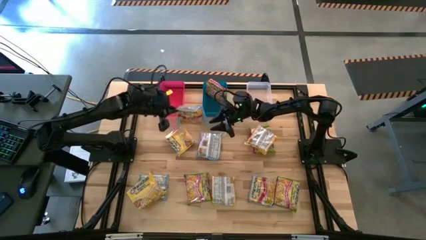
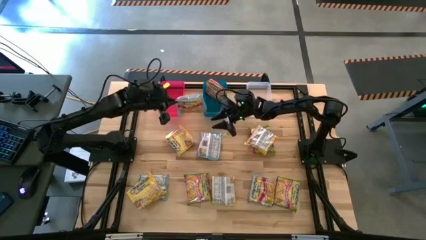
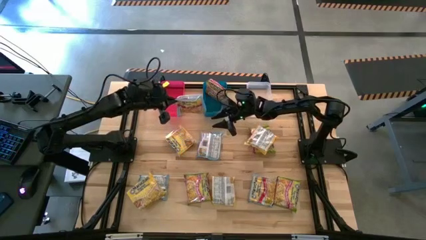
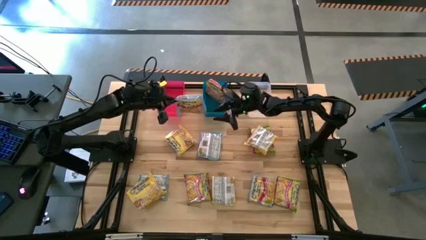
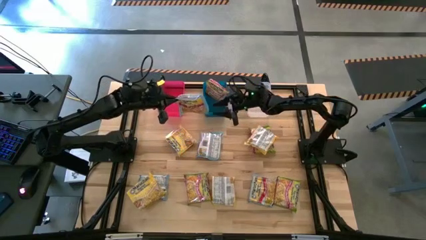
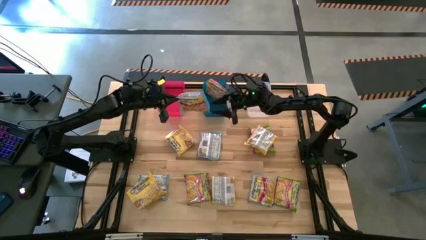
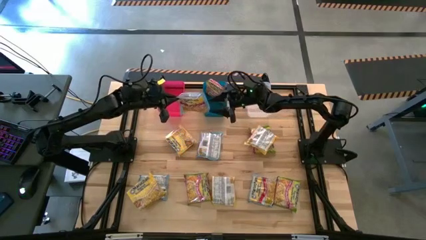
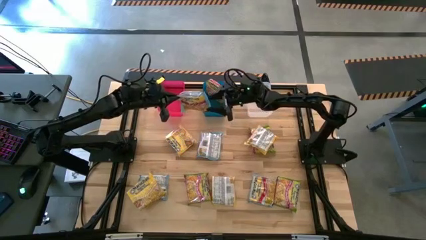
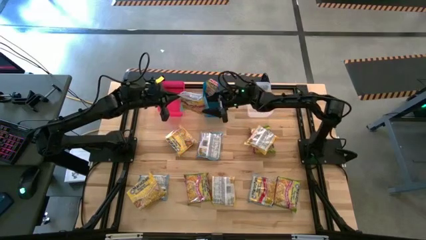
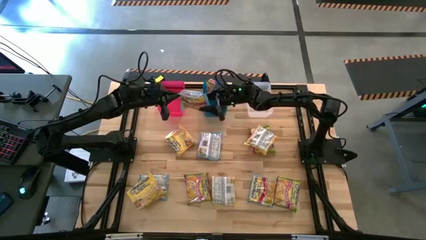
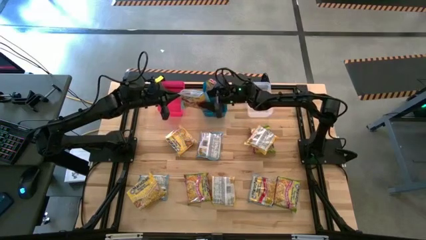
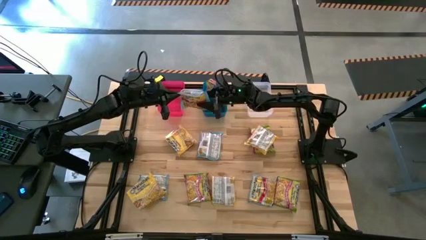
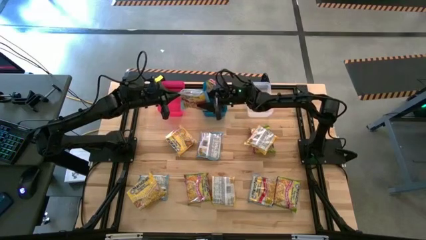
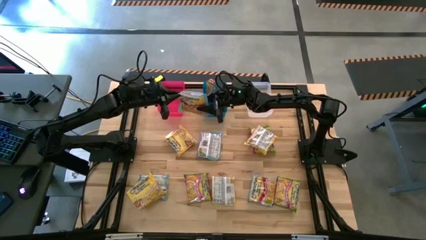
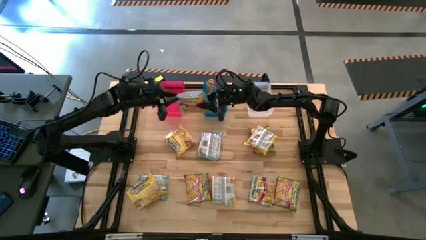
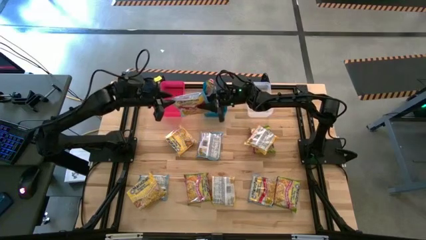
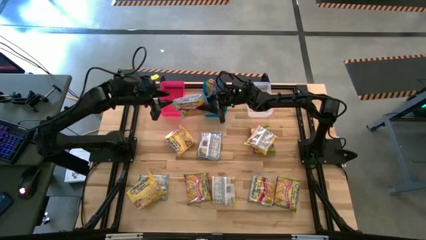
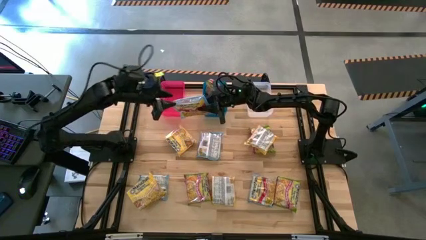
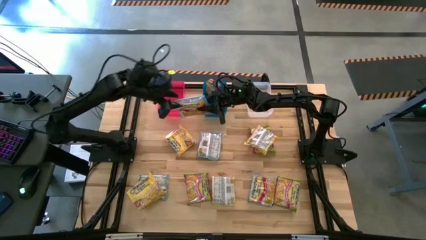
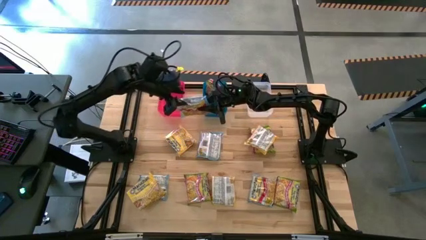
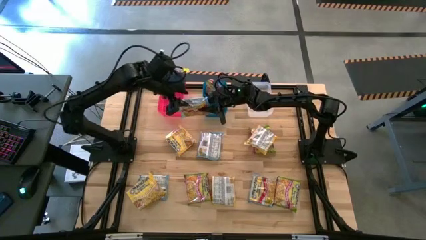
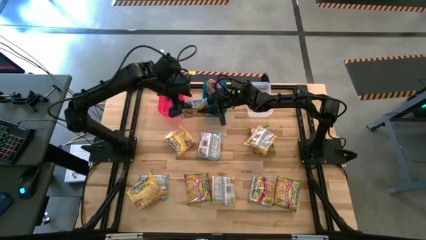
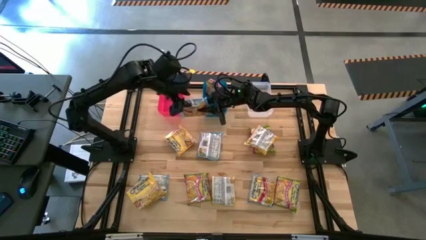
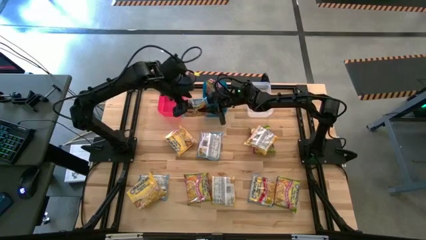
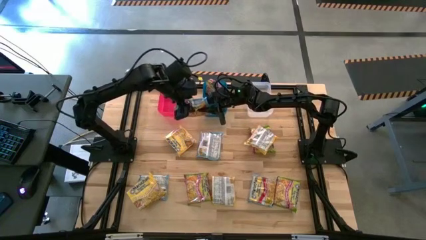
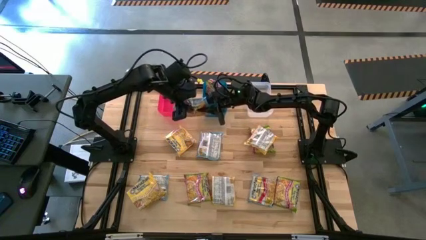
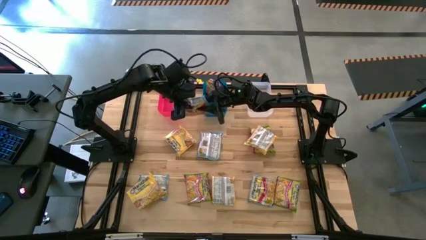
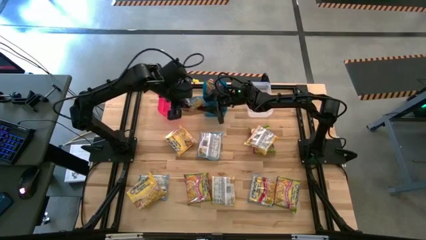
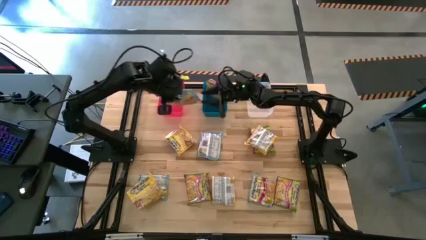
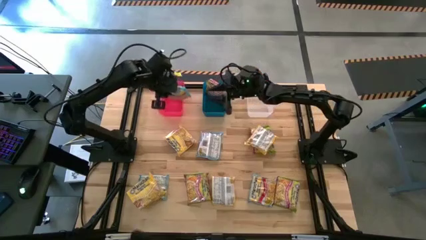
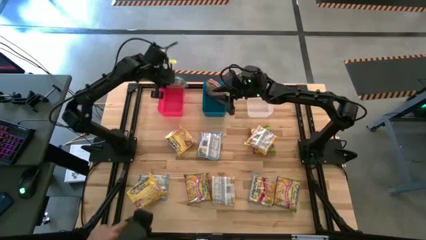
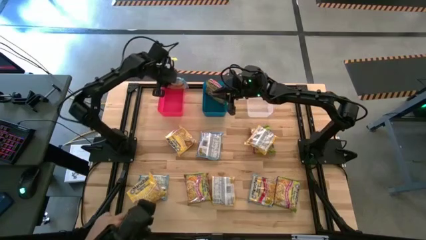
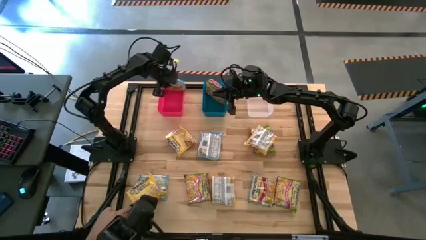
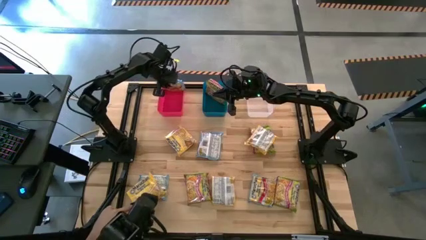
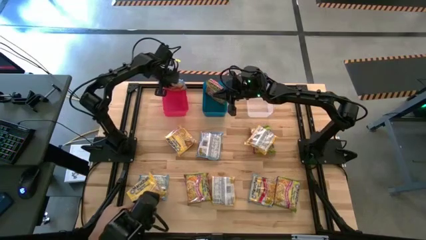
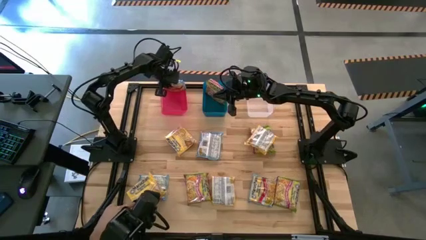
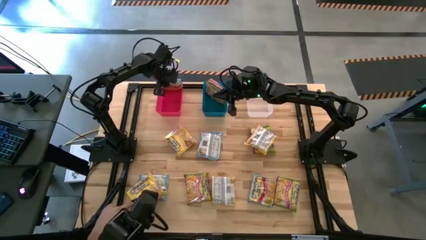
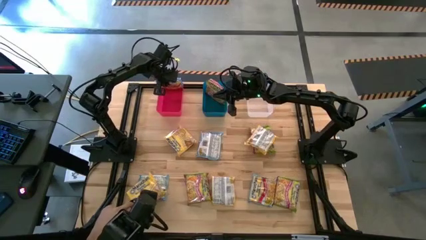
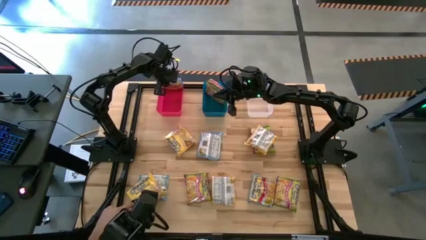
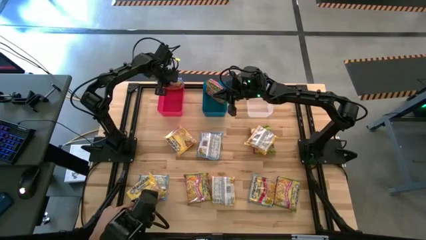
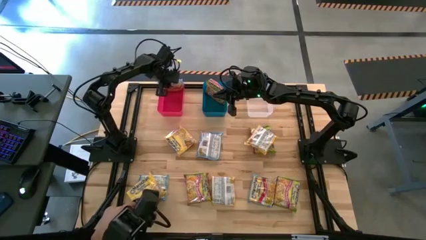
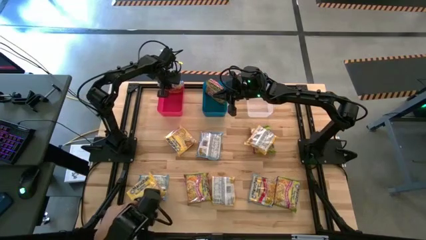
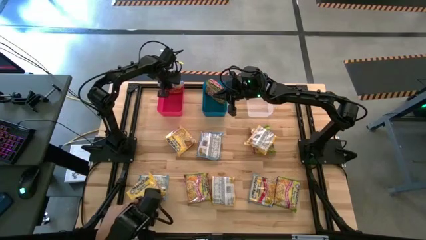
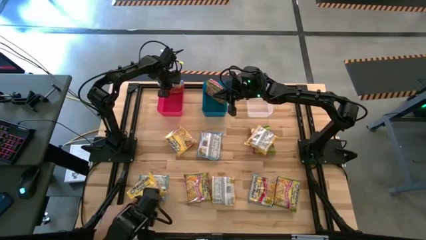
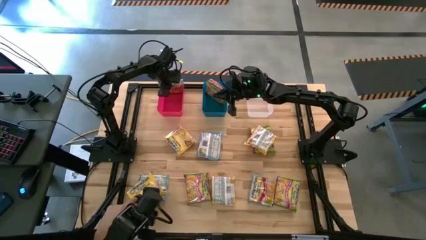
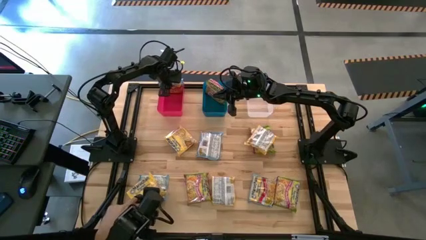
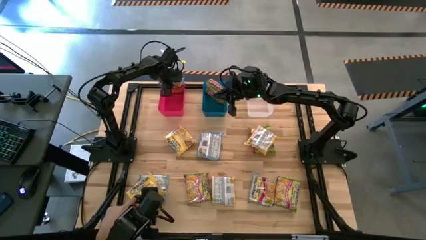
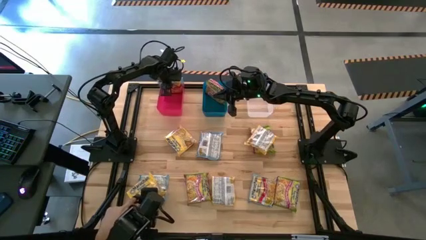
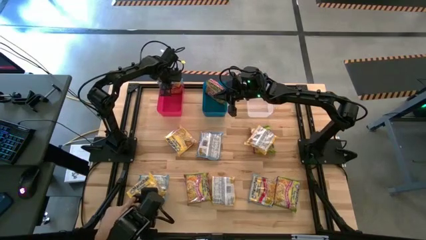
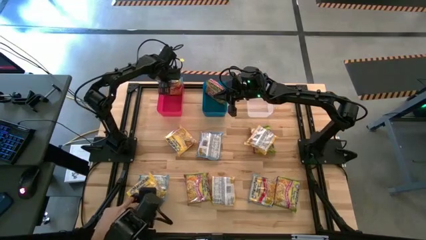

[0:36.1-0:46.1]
Task: Sort Maruchan noodles
Put the top blue noodle pack into the red bin

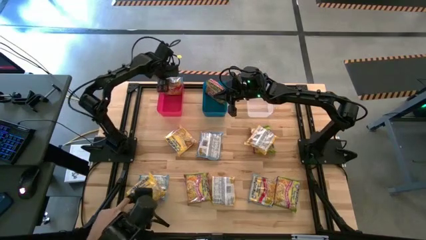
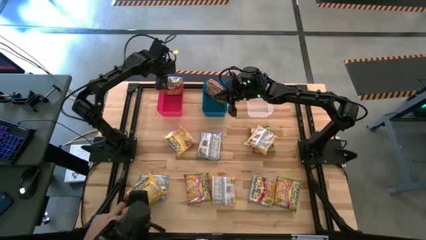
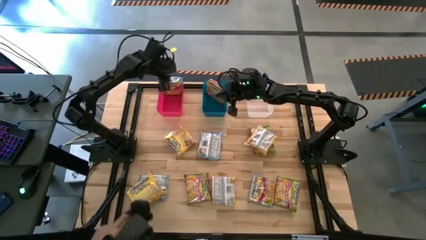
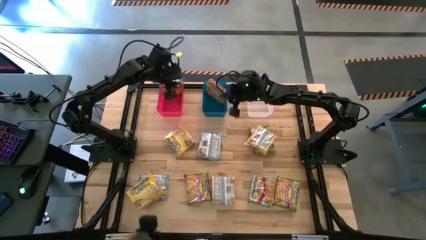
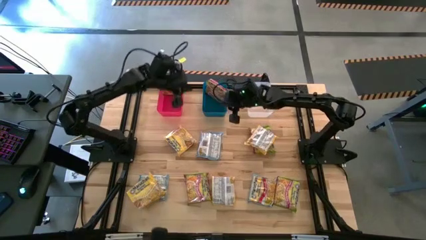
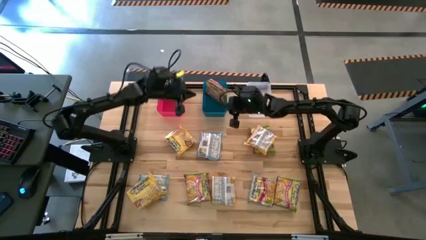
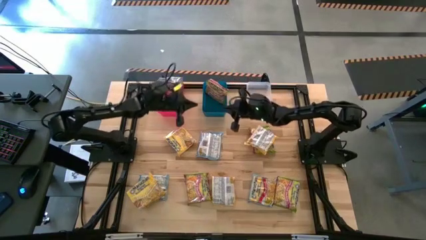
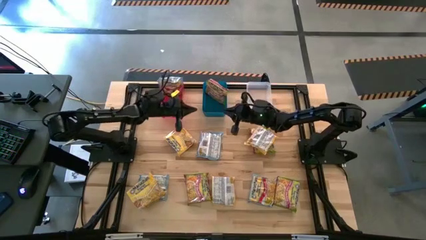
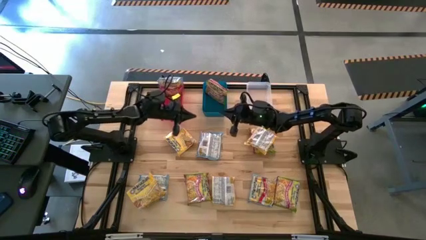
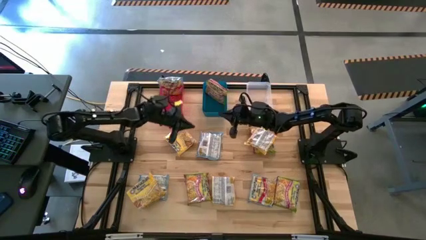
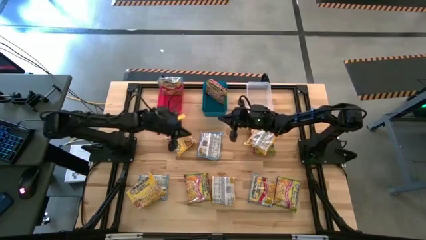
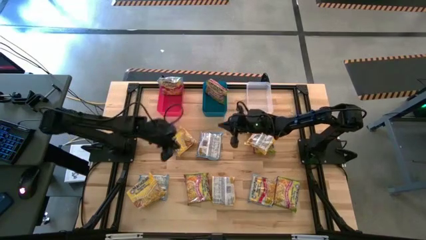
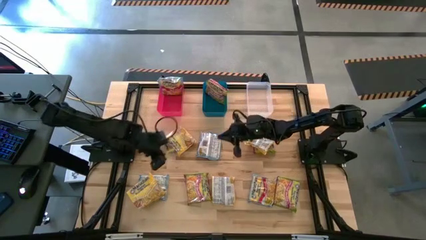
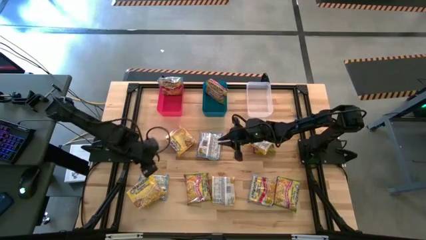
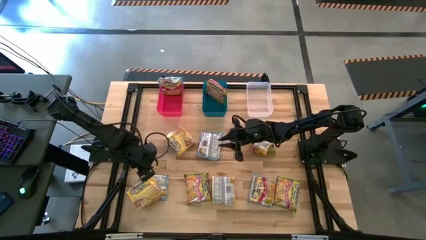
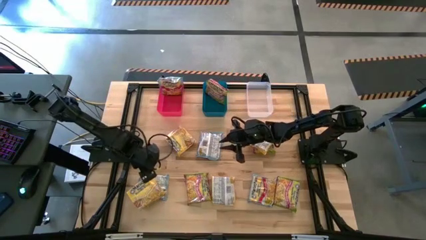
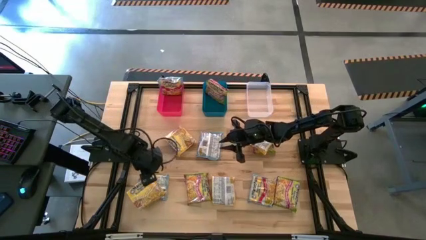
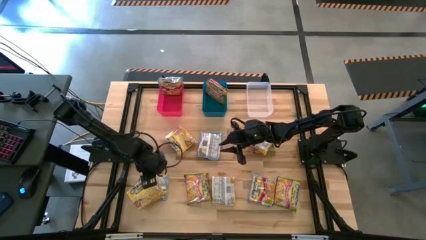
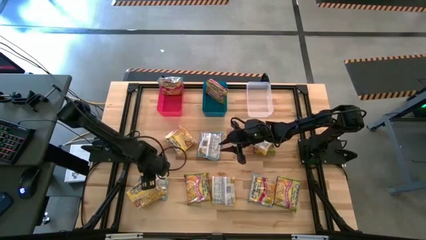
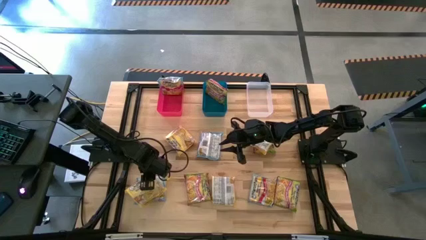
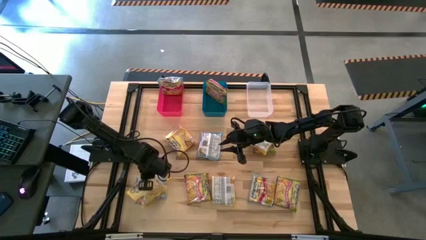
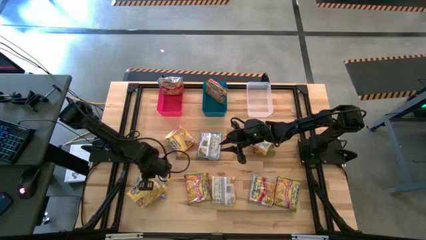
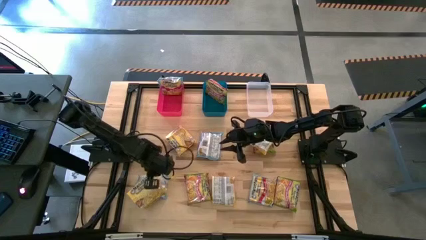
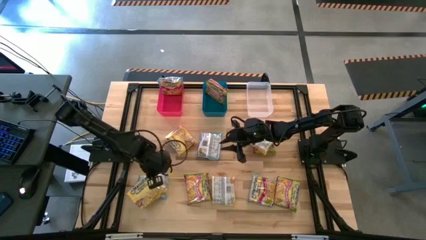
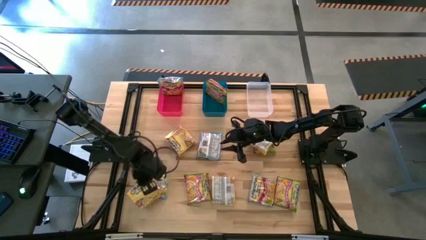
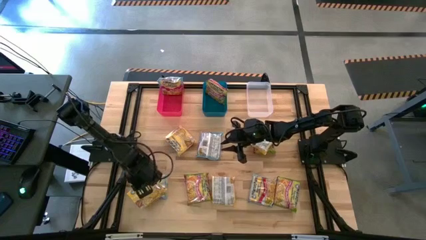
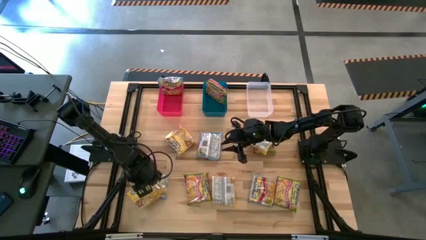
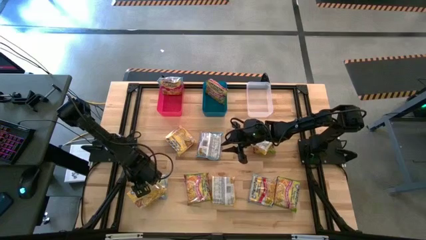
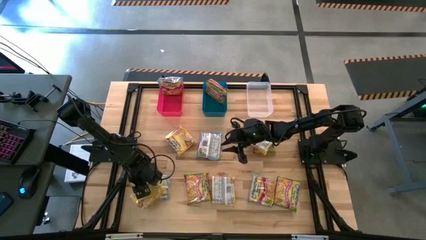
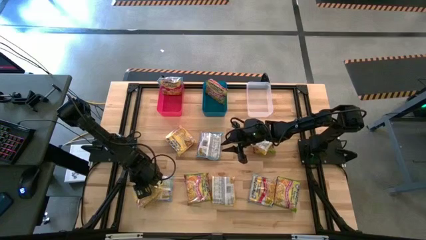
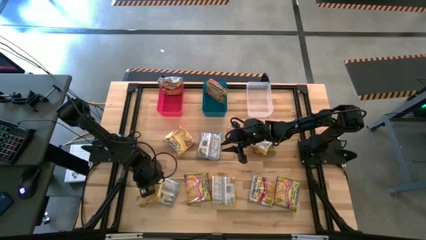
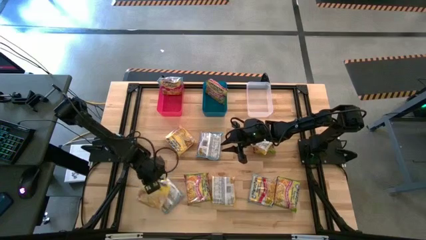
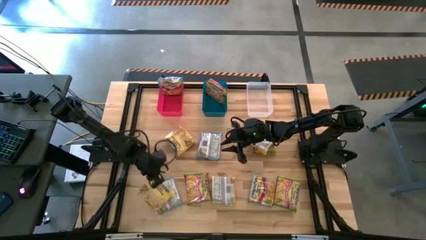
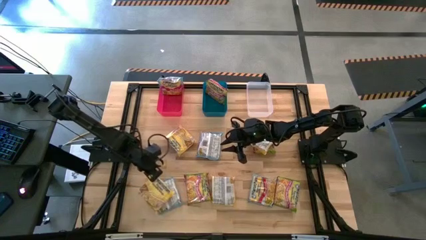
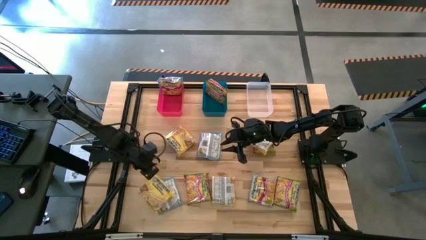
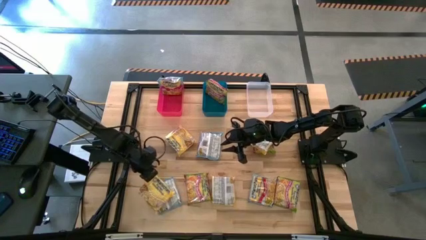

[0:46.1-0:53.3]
Put the bottom left yellow noodle pack into the transparent bin
